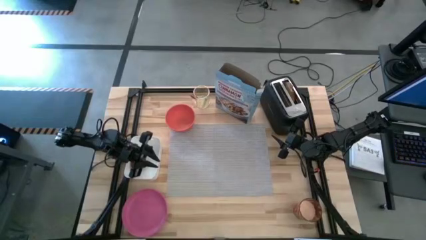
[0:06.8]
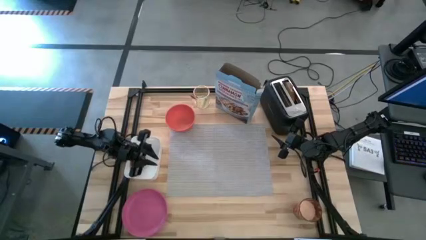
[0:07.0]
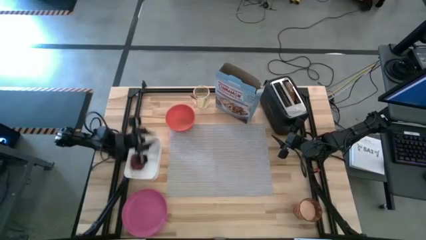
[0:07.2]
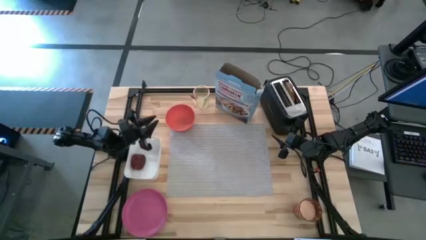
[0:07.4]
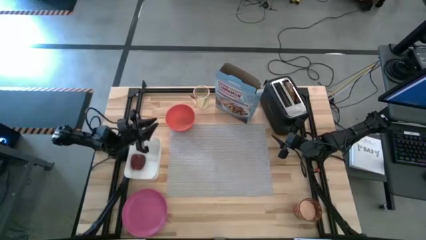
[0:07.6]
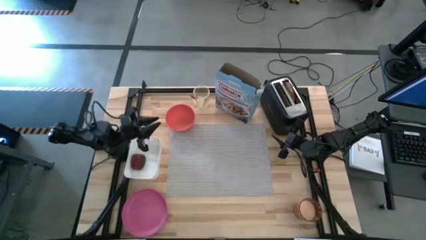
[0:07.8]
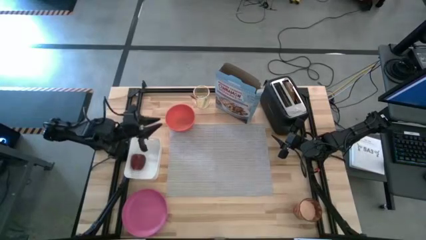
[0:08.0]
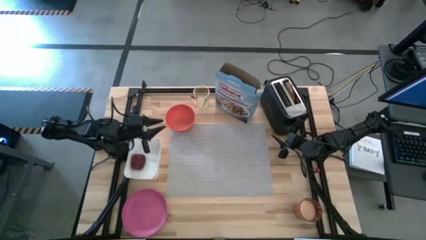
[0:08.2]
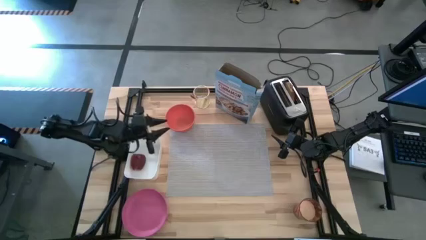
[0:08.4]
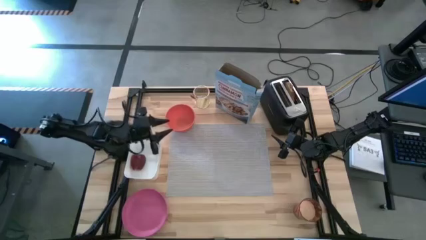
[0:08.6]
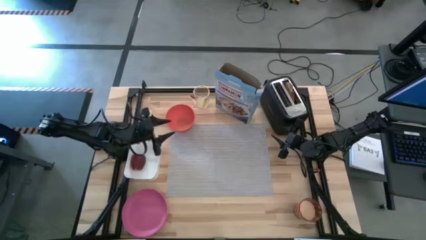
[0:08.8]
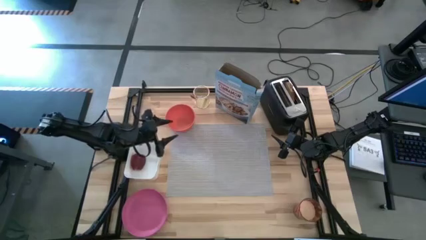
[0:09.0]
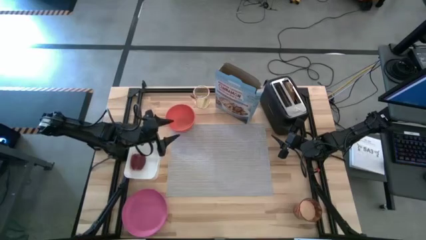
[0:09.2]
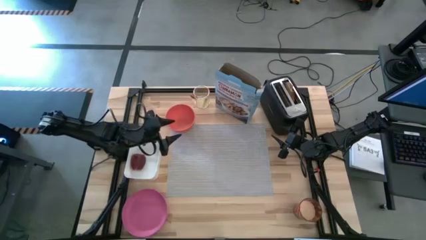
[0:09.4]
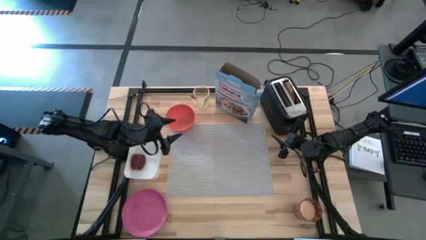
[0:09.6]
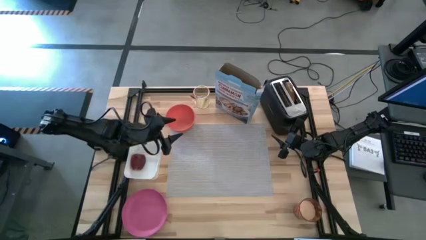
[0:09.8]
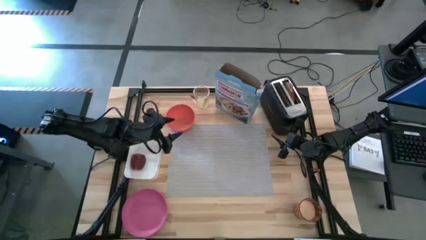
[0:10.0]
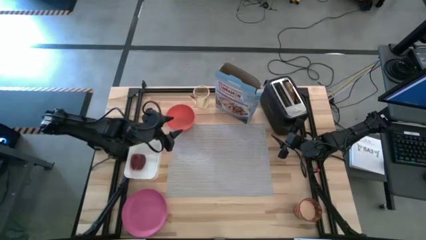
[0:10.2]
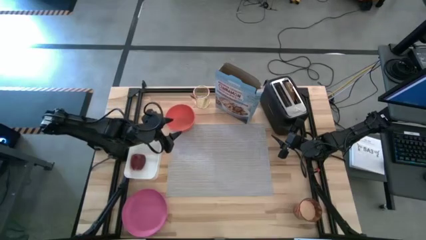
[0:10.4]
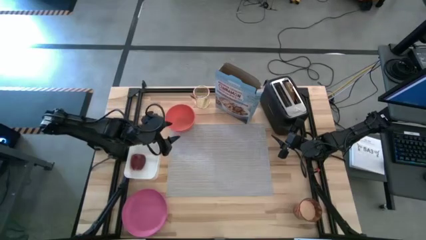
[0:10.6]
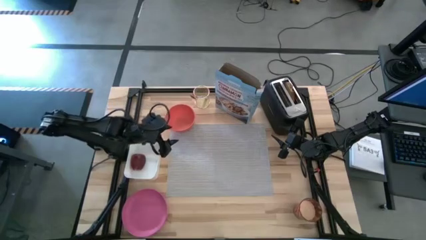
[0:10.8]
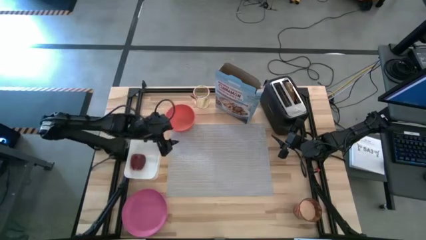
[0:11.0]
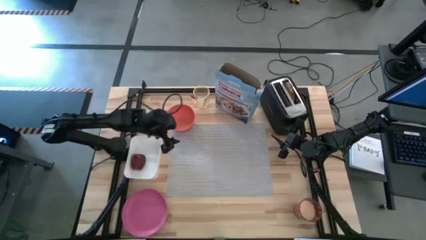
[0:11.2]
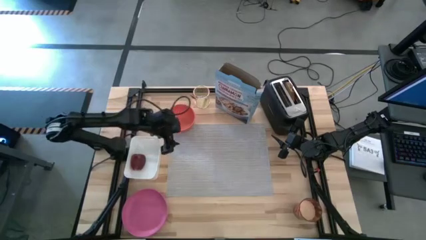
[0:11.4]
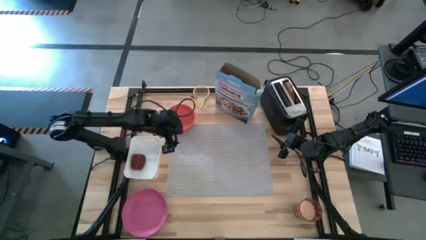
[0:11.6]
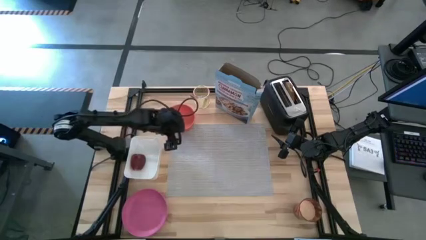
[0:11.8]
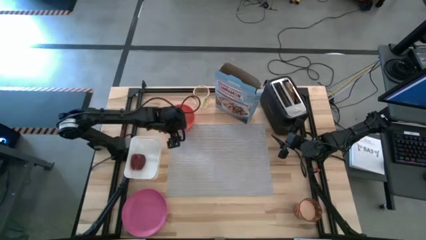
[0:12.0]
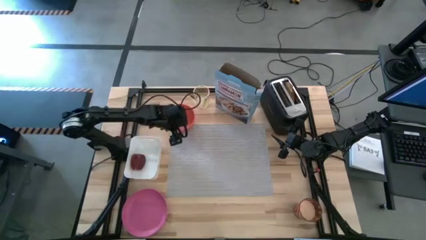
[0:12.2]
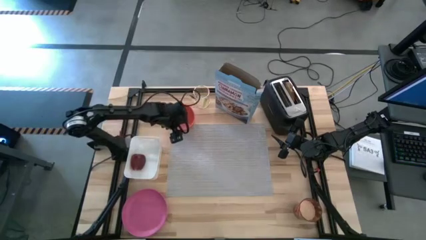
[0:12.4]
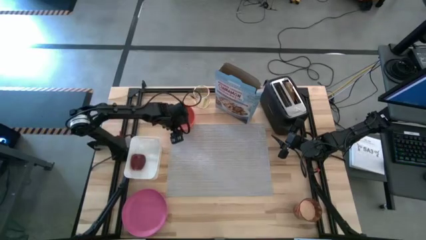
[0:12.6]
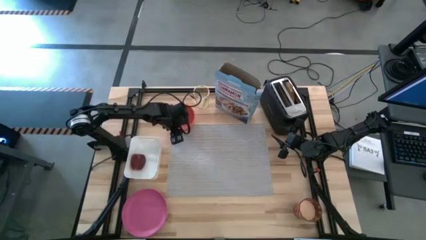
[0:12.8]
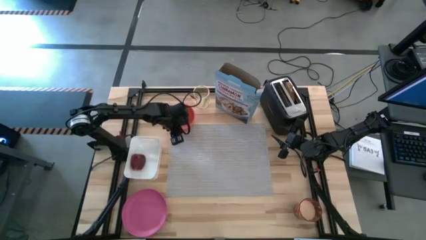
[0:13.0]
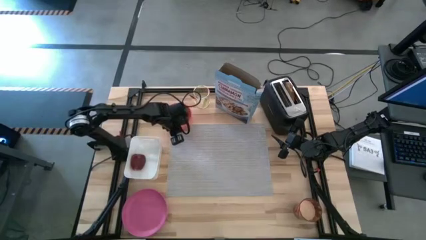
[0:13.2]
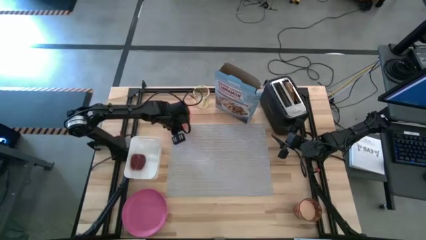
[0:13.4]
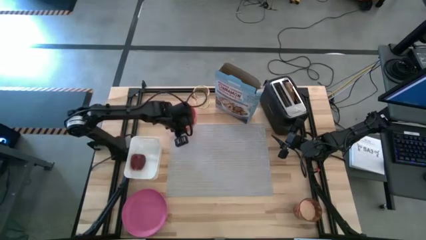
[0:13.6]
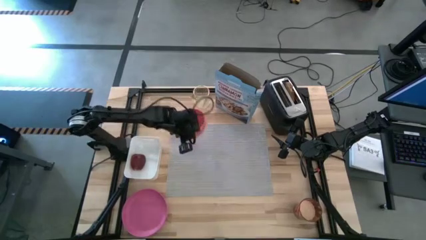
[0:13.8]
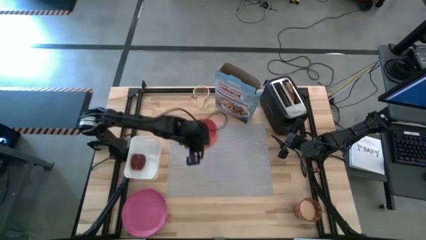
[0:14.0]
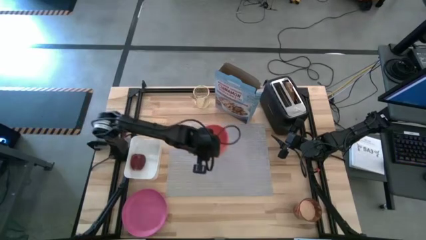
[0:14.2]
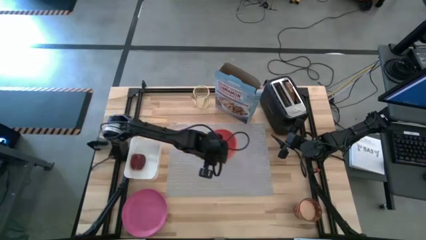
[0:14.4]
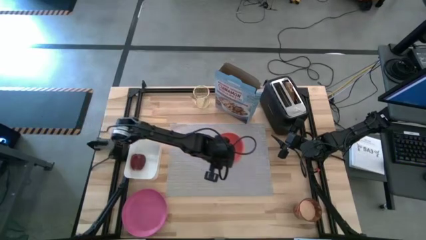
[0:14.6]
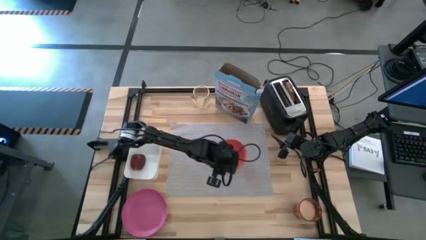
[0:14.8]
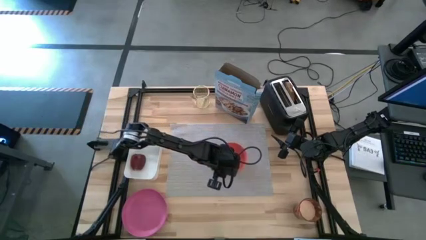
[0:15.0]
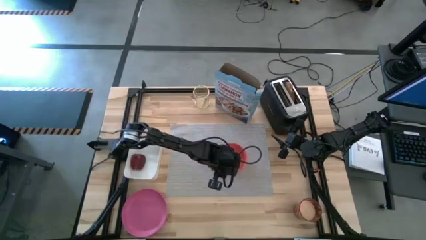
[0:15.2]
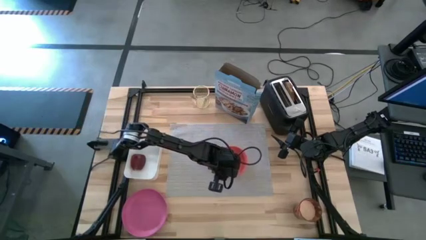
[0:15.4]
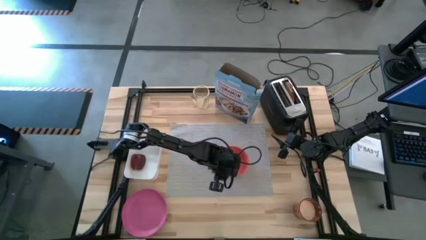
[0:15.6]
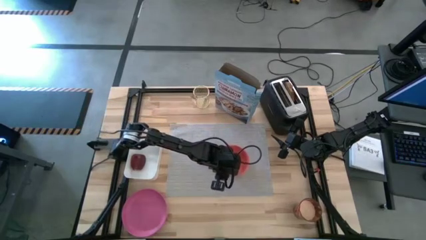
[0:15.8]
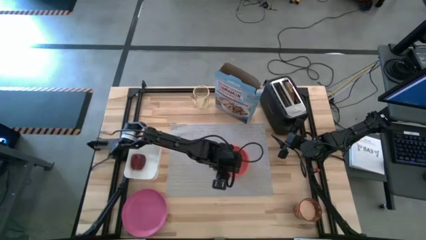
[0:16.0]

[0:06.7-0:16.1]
Task: Arrange a breakfast setting
Put the orange bowl on the grey table mat

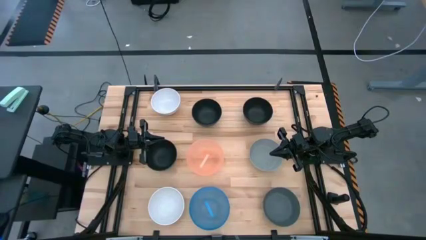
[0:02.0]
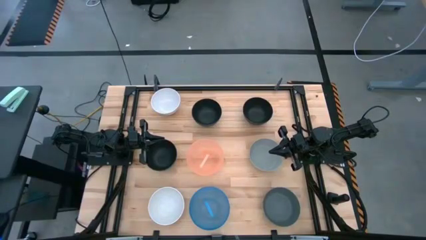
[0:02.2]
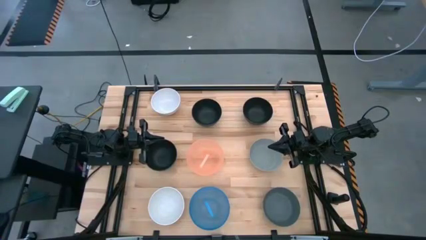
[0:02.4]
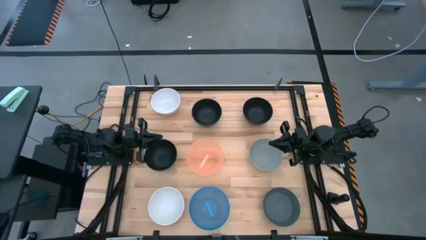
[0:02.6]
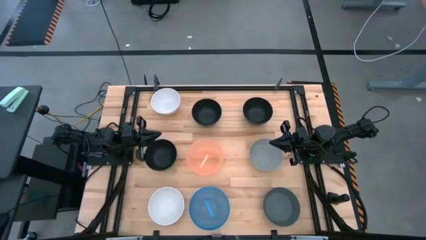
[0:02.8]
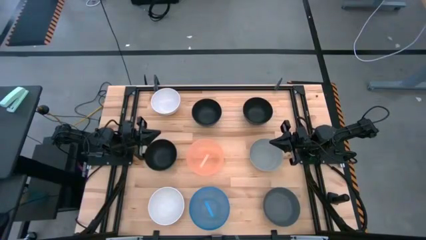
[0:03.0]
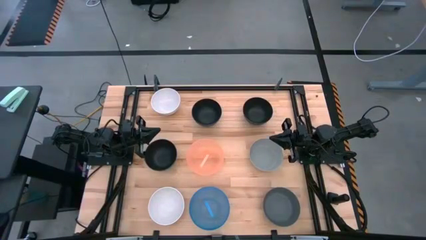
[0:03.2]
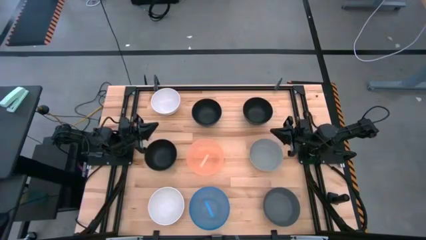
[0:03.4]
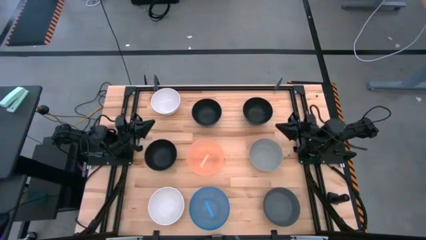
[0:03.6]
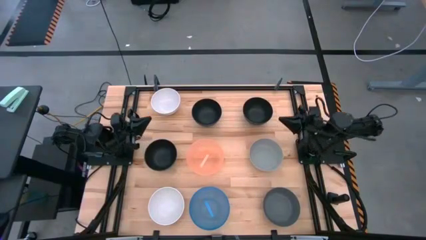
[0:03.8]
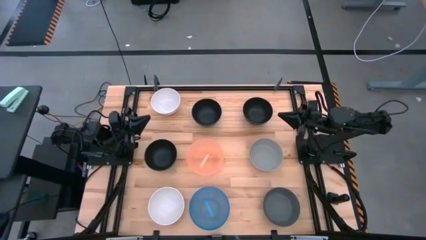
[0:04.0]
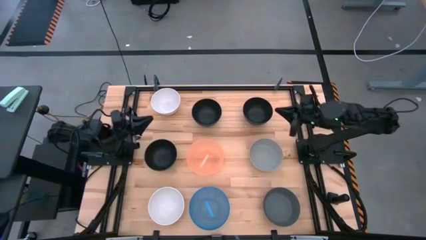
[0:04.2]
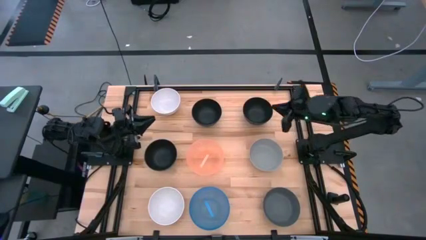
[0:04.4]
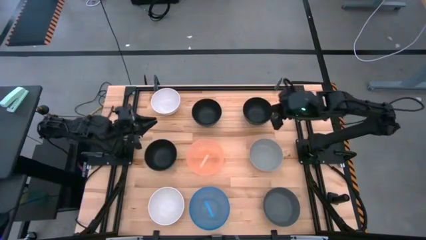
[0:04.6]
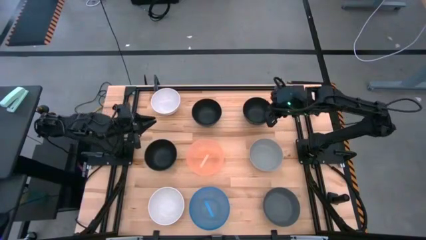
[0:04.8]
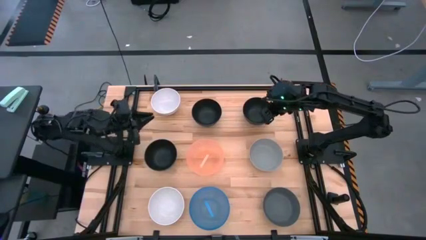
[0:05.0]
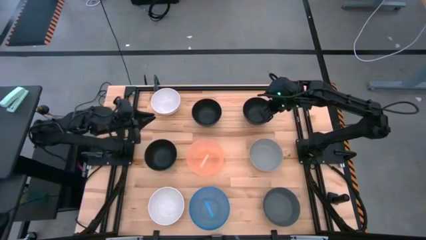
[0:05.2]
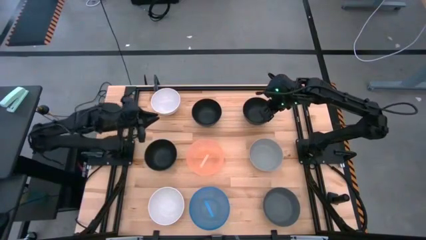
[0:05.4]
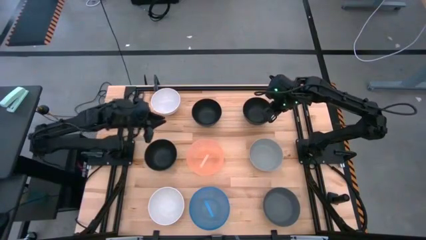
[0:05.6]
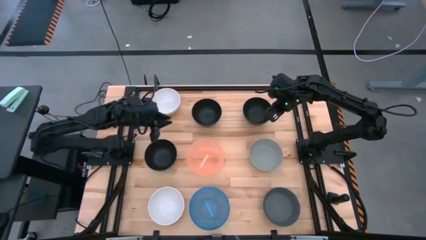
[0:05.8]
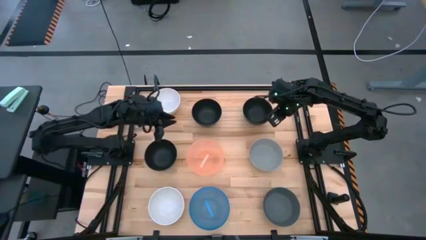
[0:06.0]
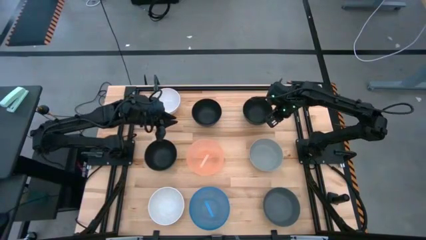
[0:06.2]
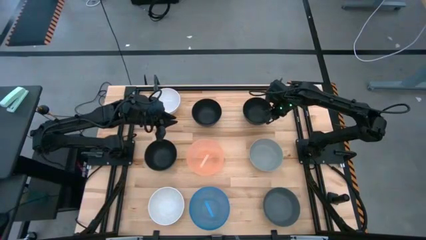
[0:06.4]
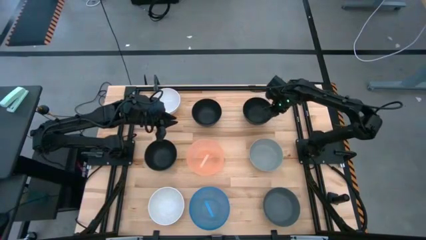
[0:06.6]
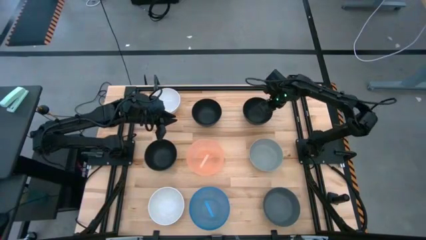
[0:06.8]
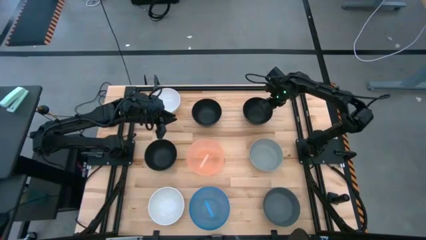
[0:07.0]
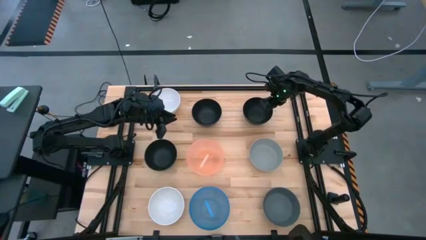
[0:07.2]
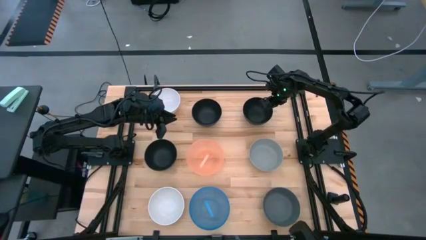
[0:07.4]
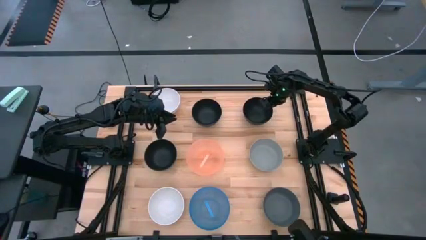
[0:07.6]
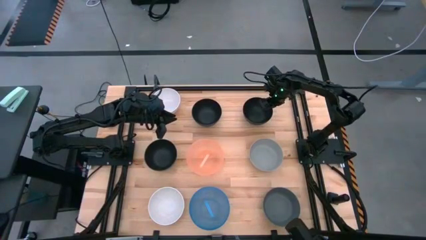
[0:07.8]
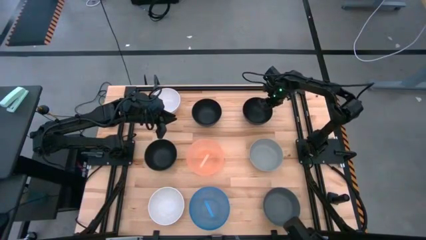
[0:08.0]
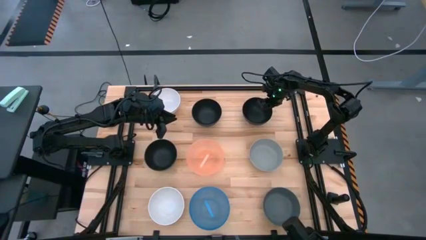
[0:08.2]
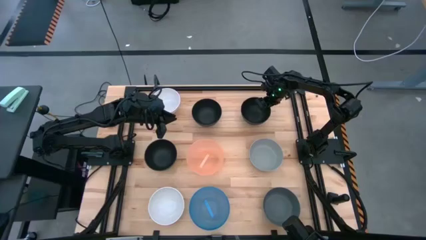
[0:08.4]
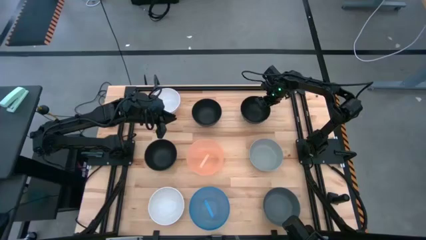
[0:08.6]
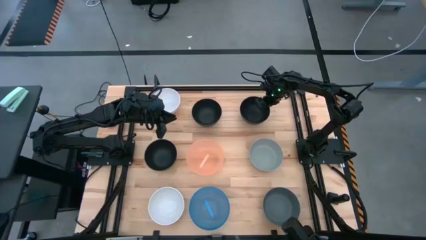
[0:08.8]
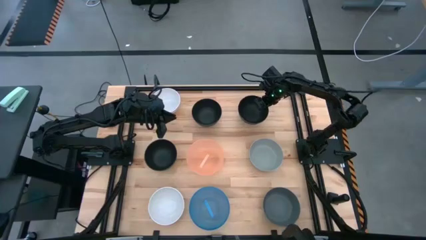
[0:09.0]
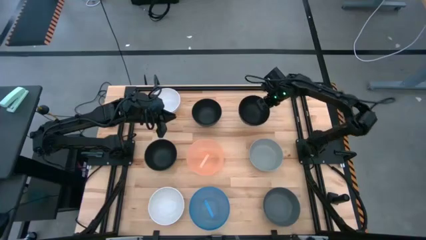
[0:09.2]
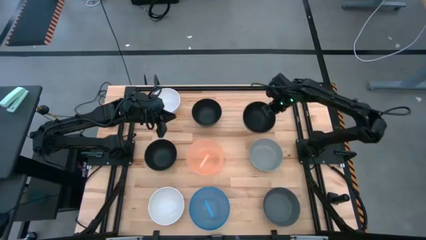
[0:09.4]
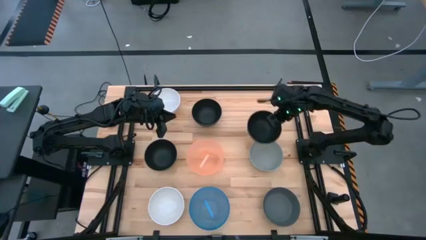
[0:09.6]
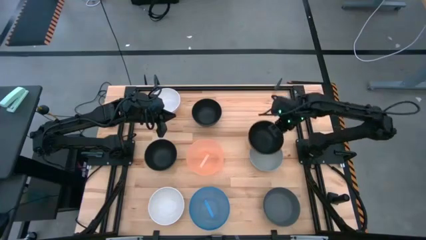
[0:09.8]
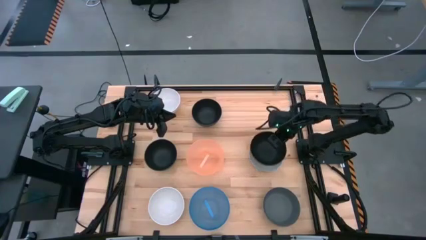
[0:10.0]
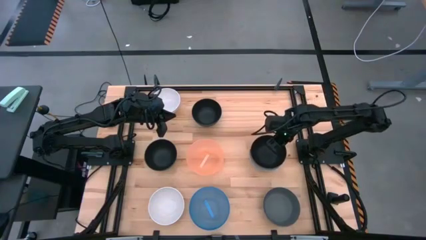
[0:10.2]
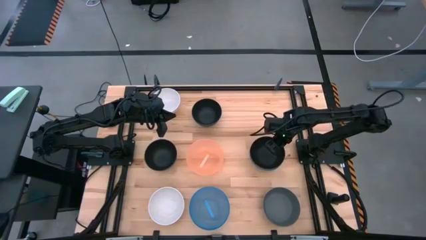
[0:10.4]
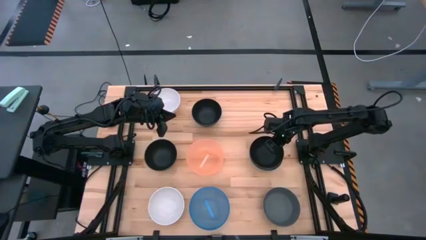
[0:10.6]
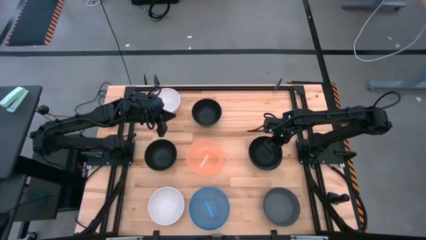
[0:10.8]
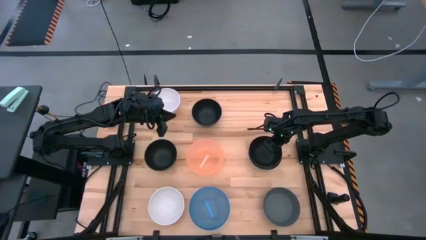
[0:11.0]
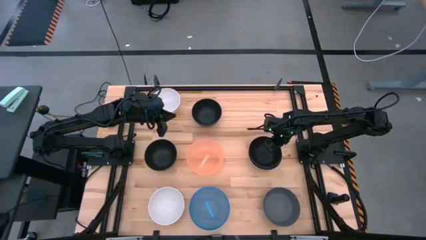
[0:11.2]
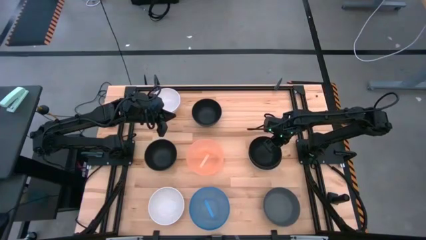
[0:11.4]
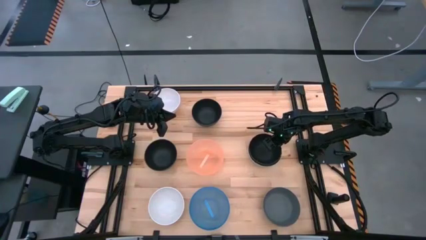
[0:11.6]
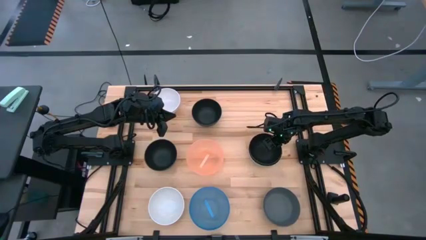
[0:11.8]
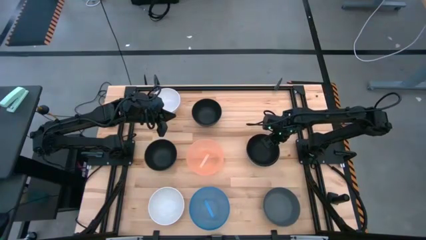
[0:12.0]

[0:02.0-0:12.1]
Task: Nest bowls inside each other
Stack the top right black bowl on top of the grey bowl
